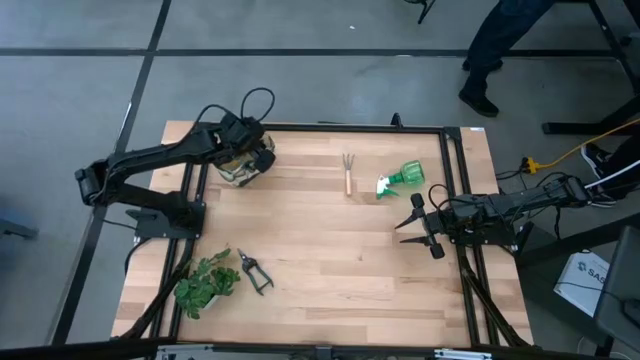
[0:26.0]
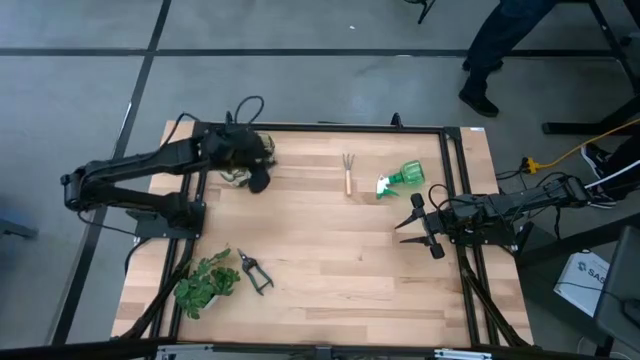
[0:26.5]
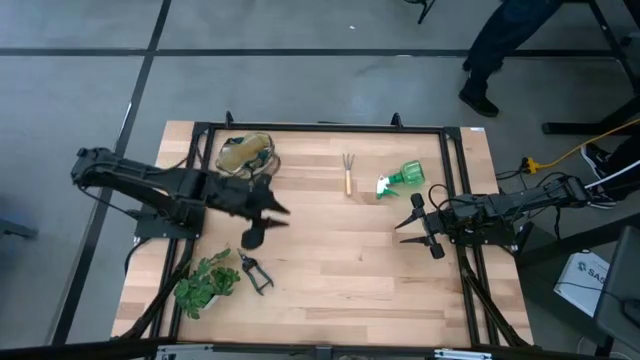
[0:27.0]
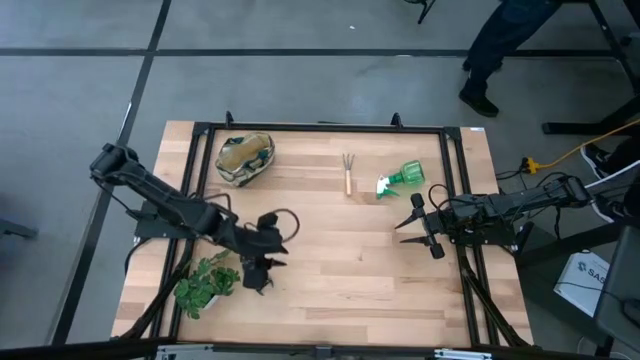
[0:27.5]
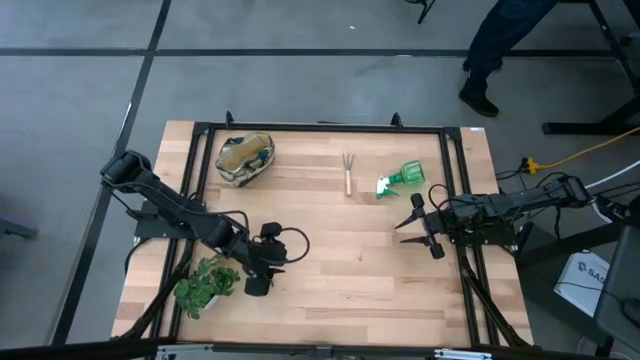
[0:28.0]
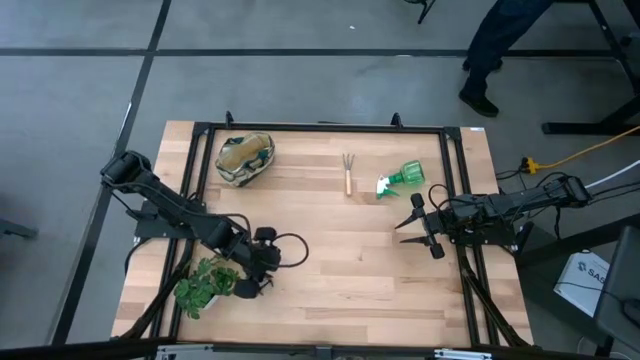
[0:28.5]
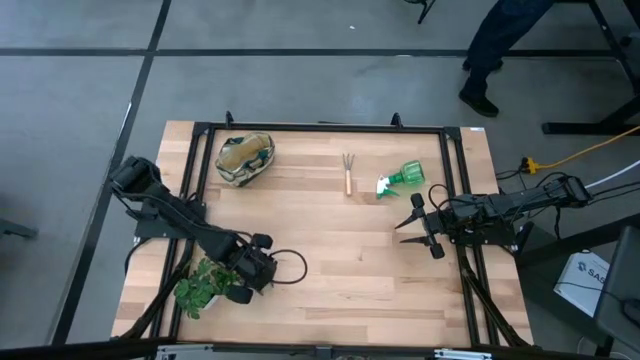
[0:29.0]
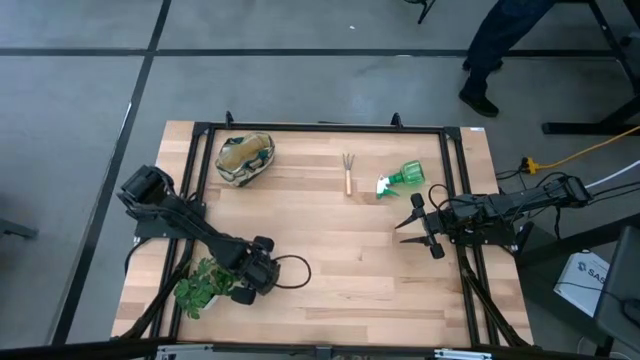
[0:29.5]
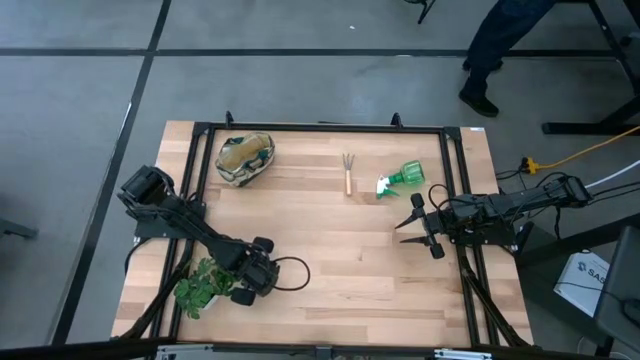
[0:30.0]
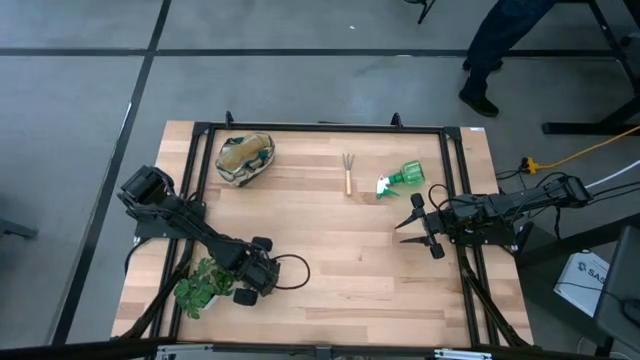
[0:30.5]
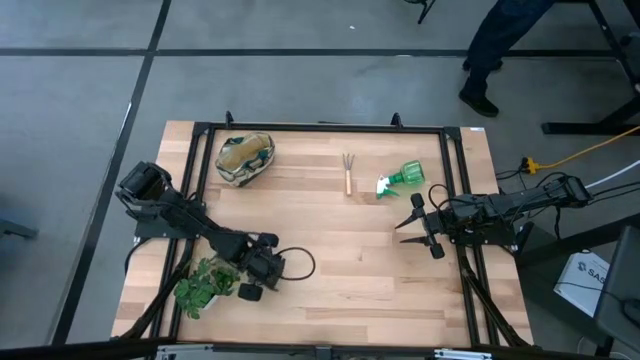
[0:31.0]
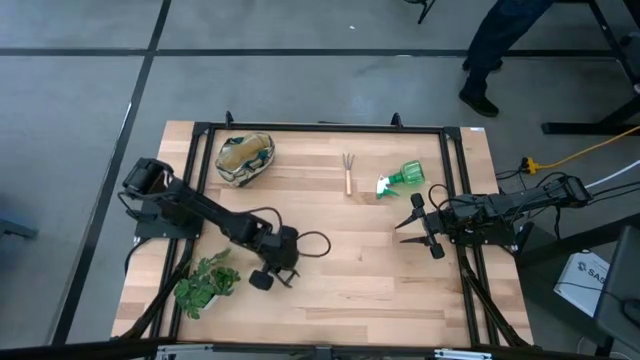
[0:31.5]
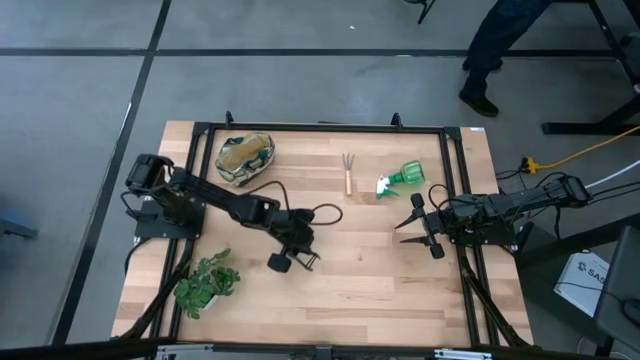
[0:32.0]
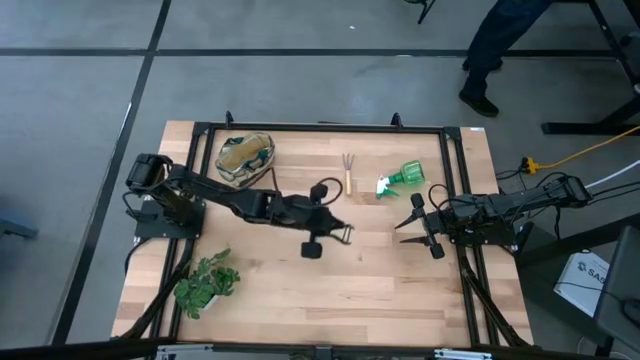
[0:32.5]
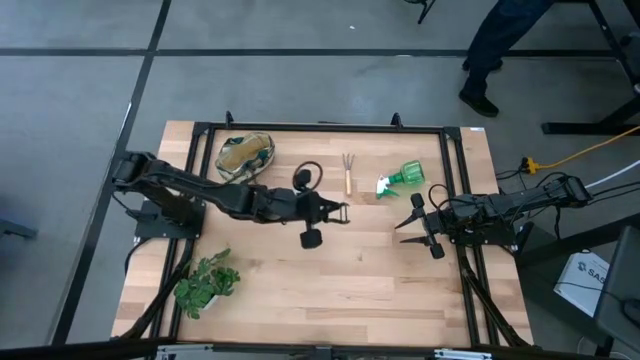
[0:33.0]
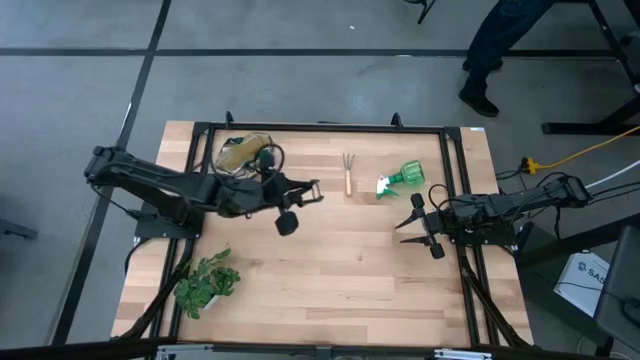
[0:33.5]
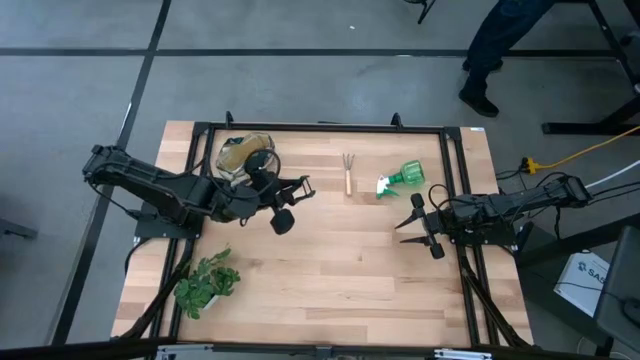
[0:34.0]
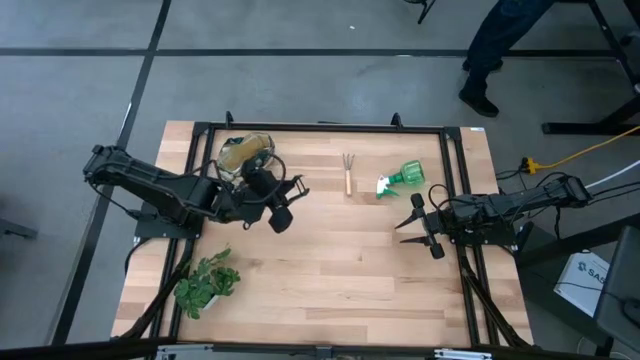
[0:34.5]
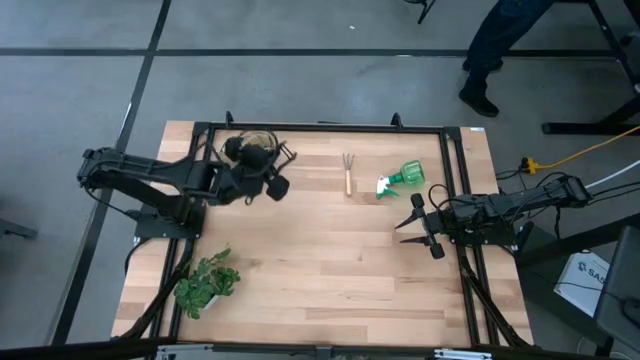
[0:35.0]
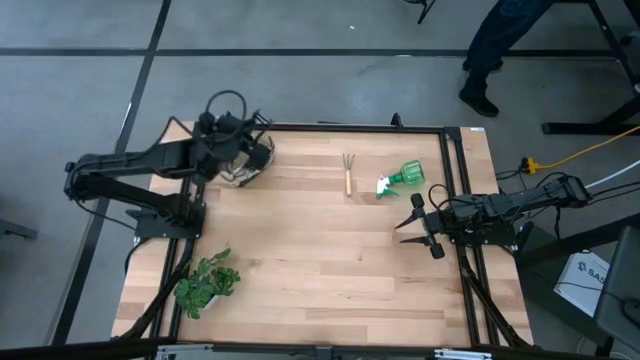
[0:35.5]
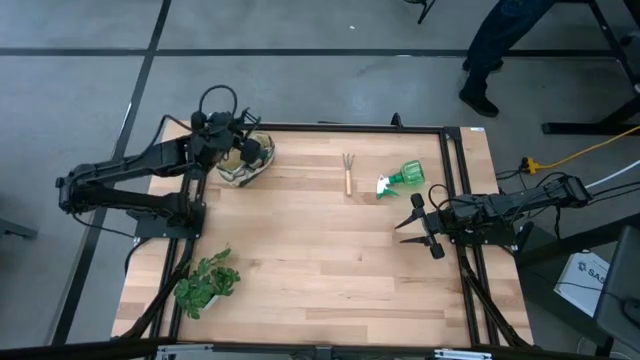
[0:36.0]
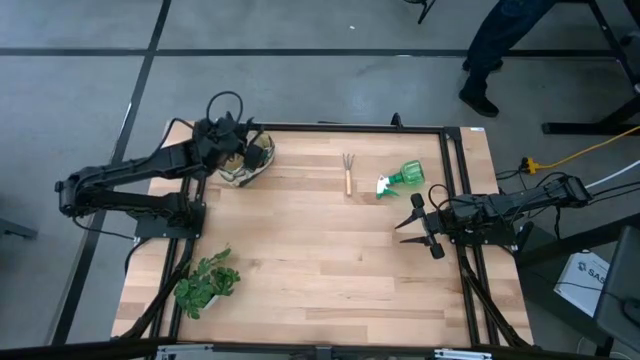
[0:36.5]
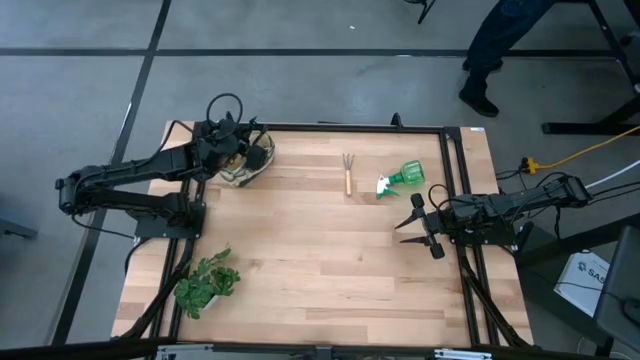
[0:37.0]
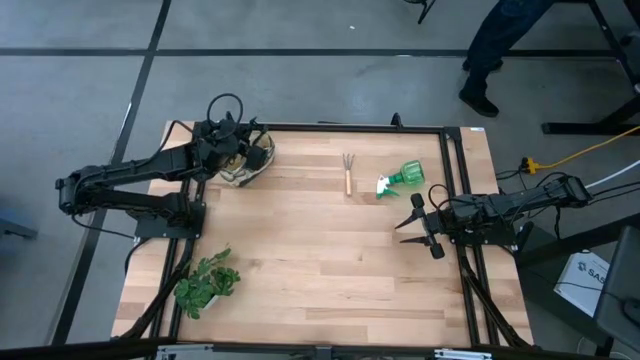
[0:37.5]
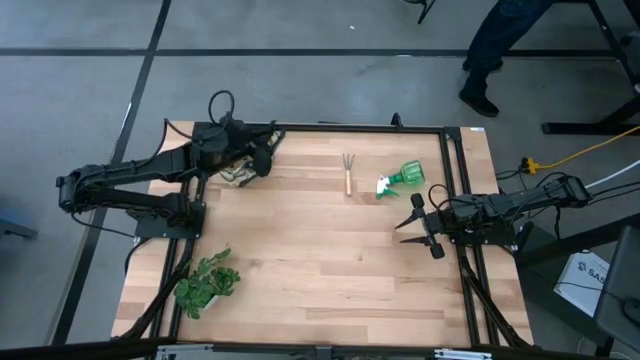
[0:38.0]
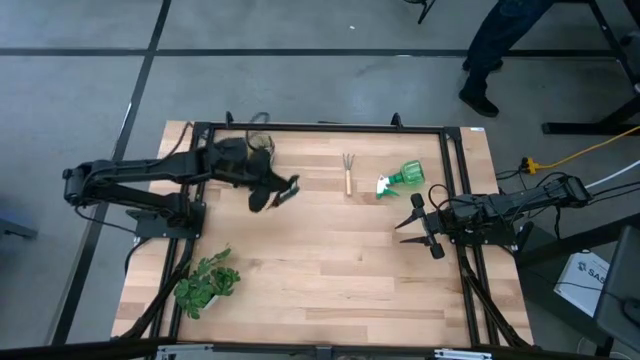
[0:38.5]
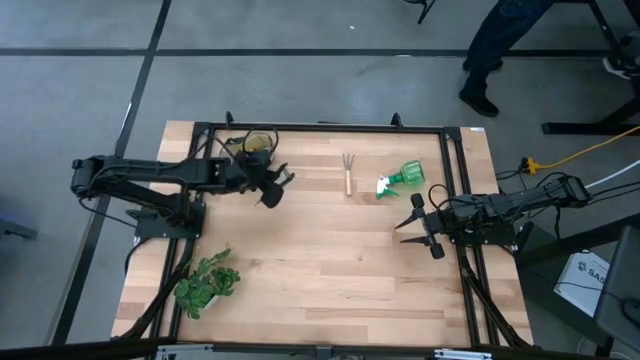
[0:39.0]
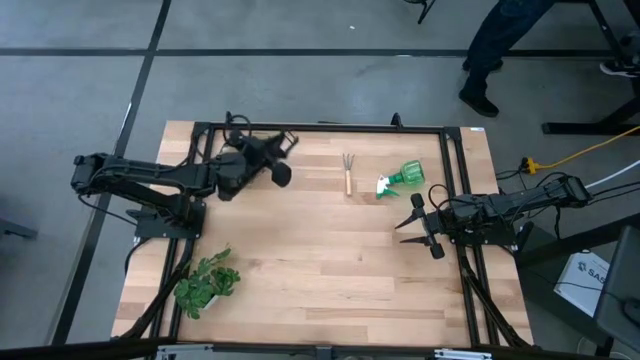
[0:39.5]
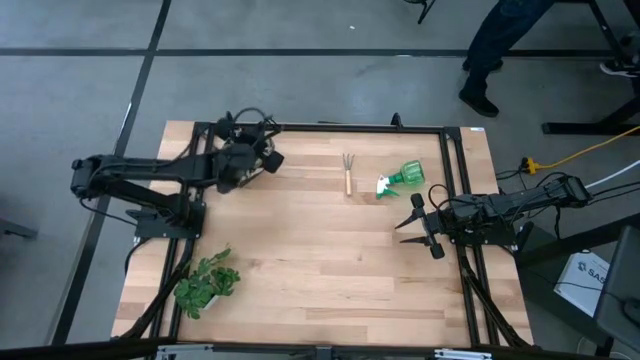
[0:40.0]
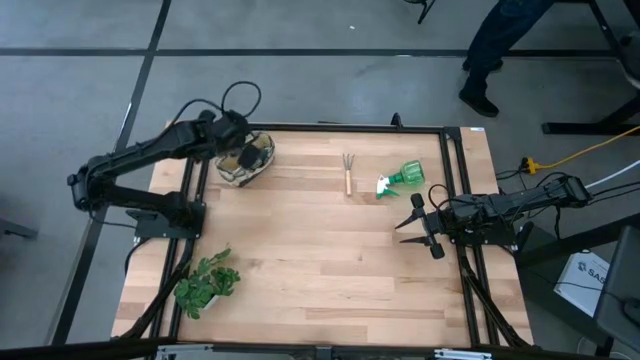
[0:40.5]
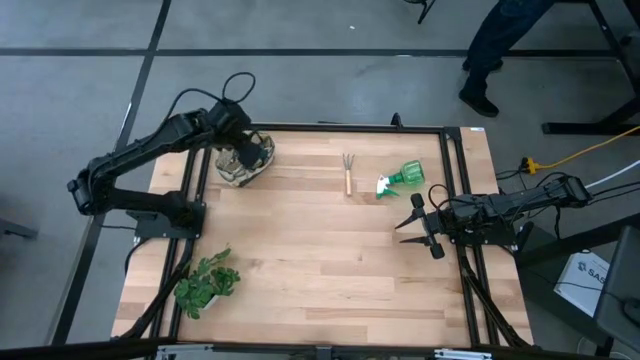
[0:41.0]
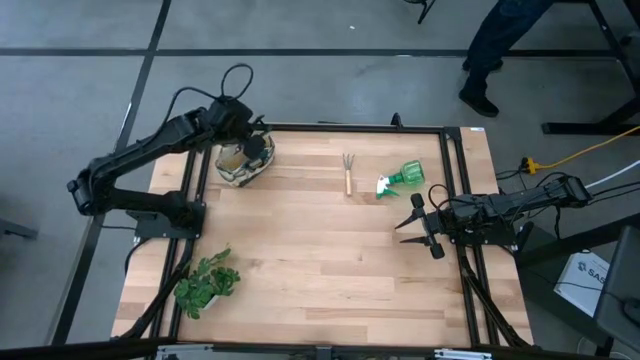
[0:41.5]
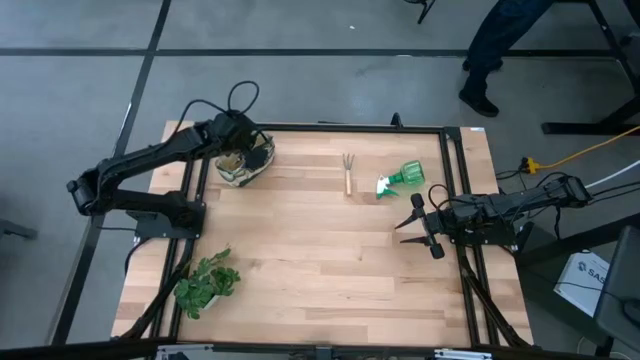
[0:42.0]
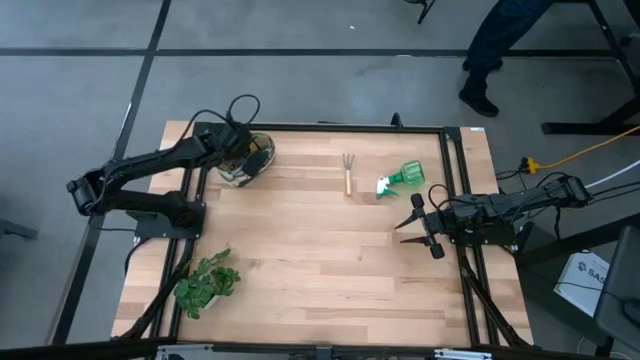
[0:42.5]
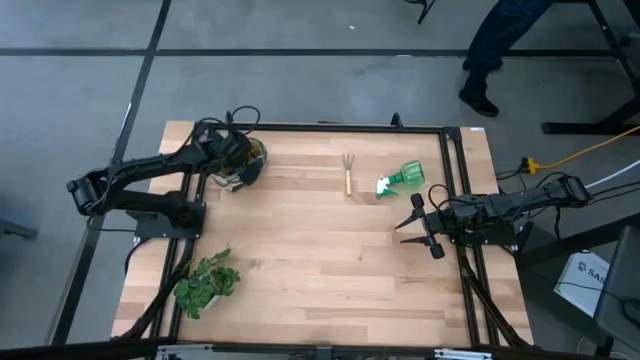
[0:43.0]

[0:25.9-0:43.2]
Task: Pick & Place Garden tools in Gardening bag
Put the shear scissors into the gardening bag

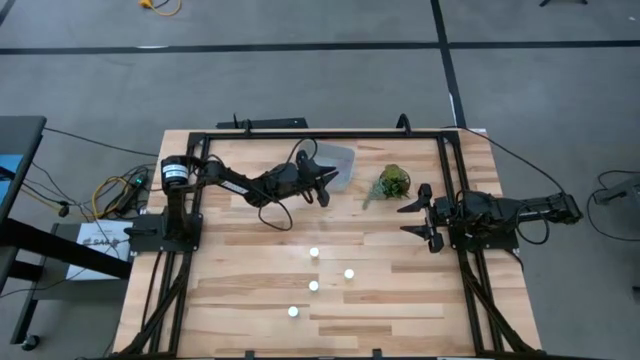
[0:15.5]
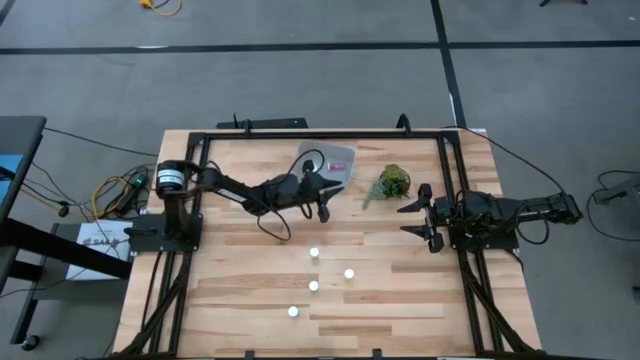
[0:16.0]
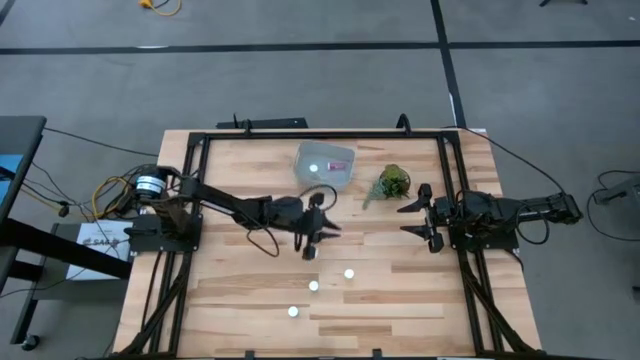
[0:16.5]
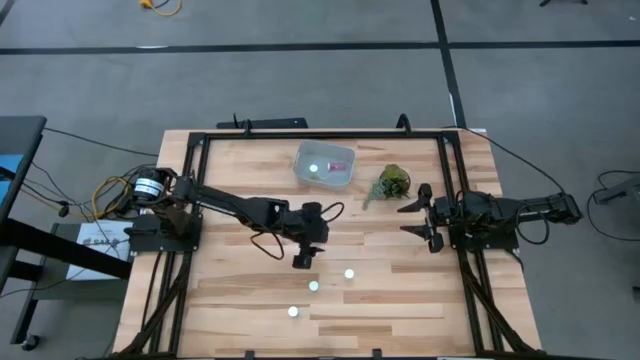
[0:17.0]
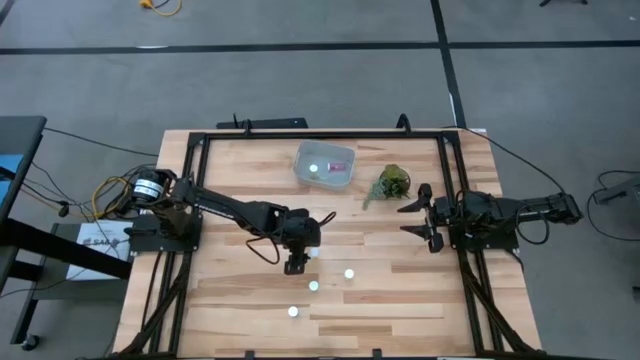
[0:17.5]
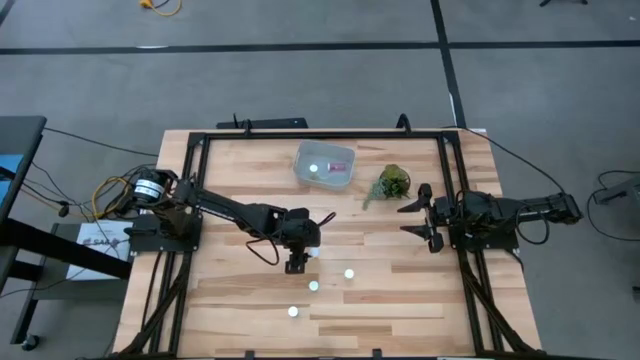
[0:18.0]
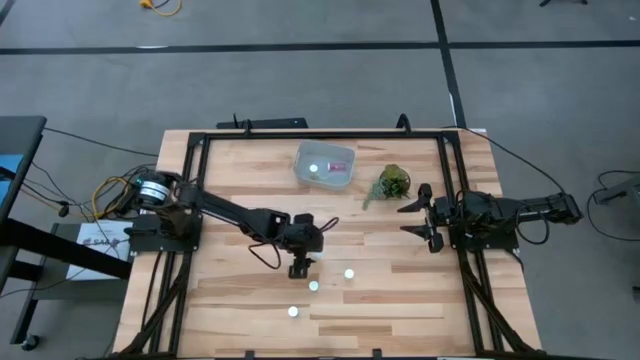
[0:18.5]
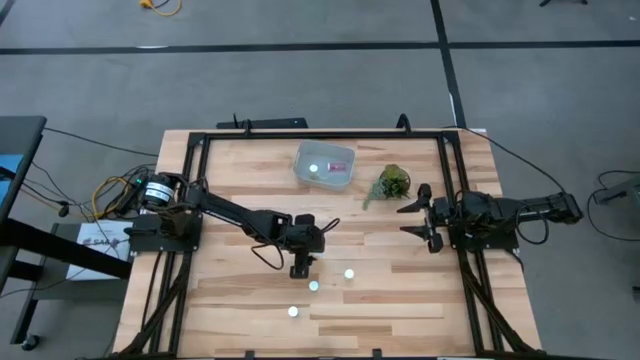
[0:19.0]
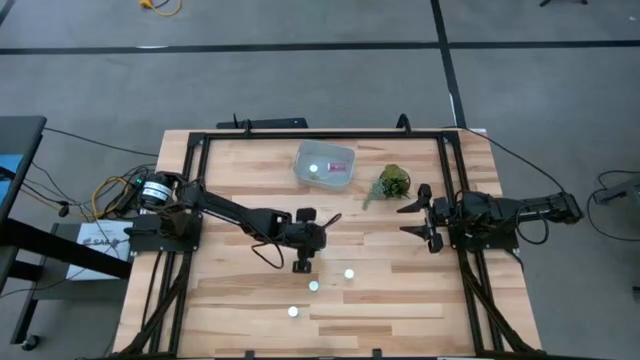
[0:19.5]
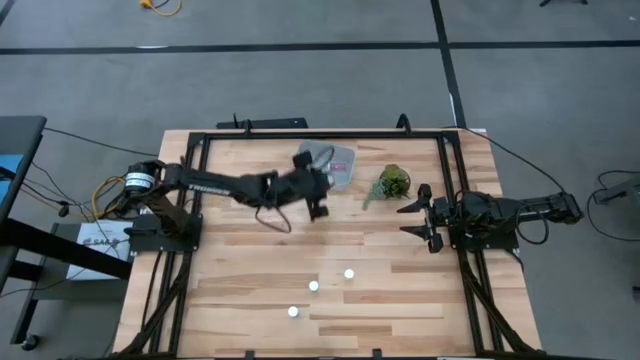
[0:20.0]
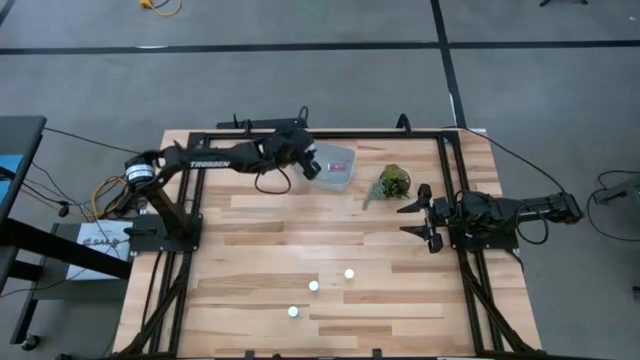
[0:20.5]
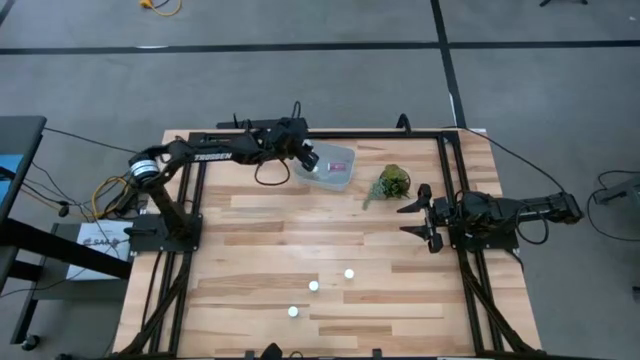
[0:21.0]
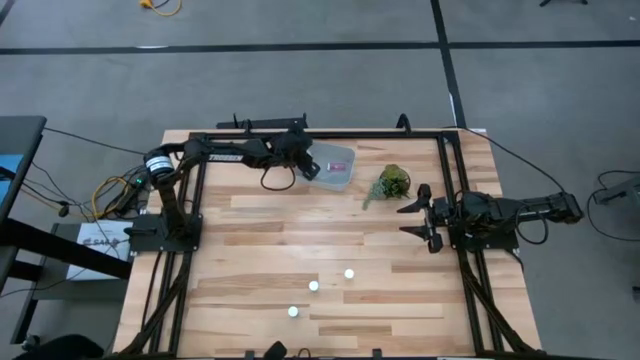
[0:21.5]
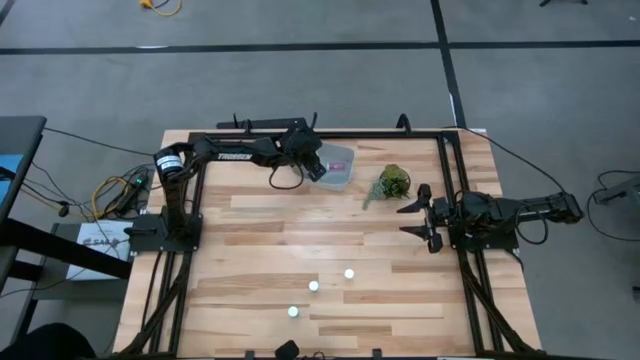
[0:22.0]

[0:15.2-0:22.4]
Task: Pick and place pill bottles into a basket
Put the top yellow pill bottle into the gray bin
